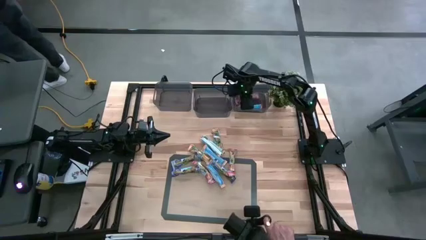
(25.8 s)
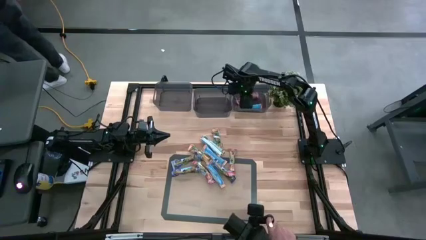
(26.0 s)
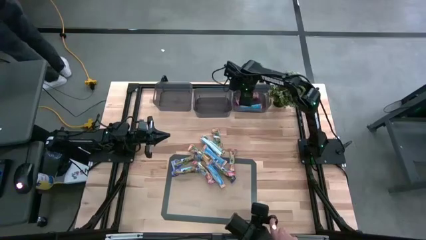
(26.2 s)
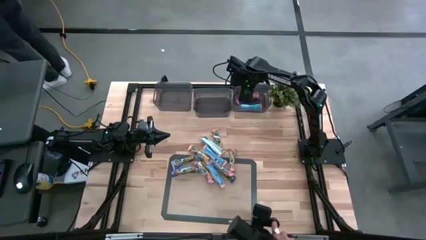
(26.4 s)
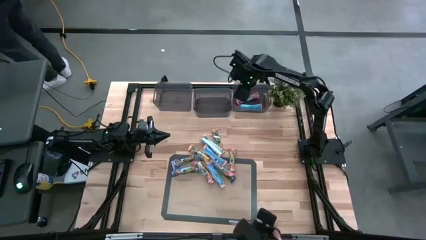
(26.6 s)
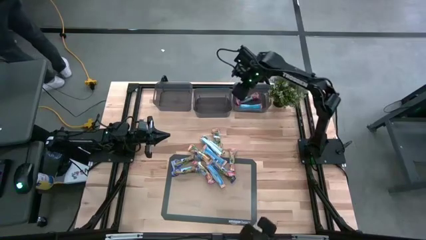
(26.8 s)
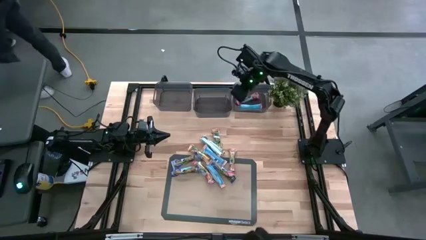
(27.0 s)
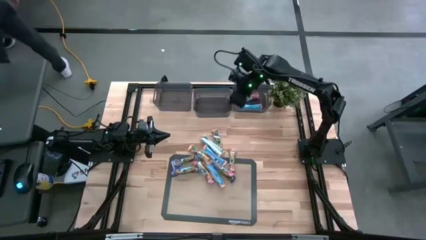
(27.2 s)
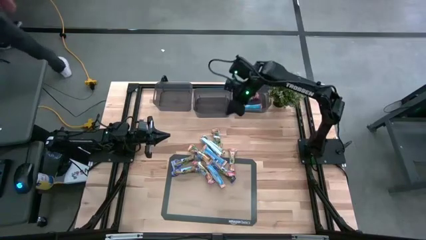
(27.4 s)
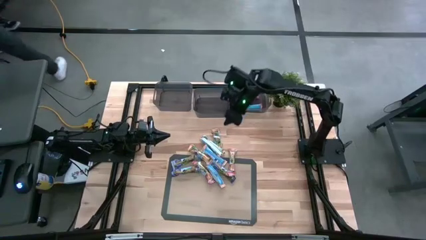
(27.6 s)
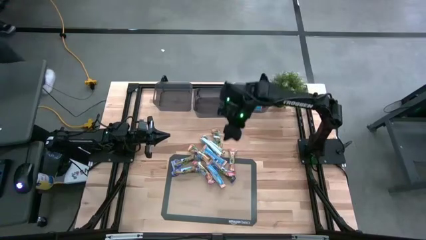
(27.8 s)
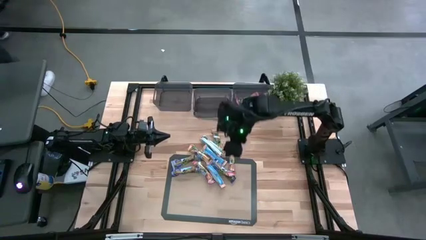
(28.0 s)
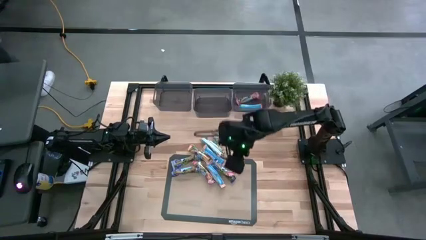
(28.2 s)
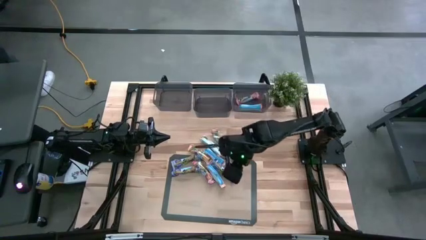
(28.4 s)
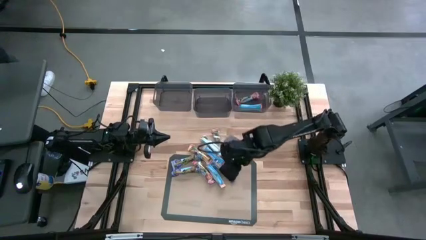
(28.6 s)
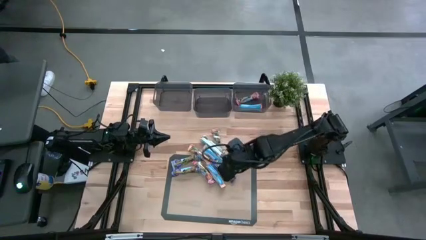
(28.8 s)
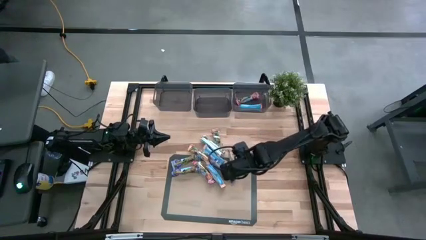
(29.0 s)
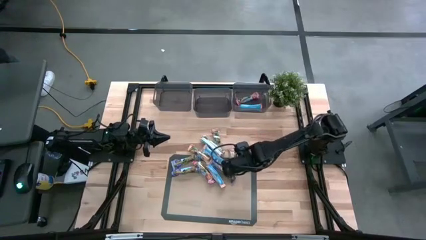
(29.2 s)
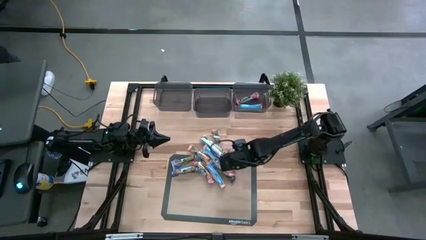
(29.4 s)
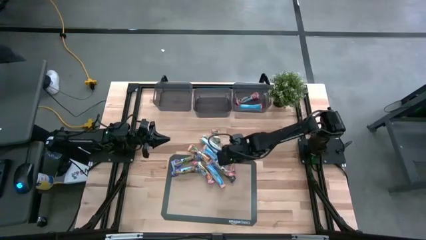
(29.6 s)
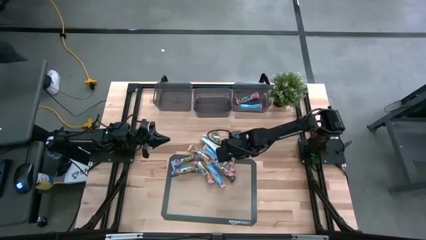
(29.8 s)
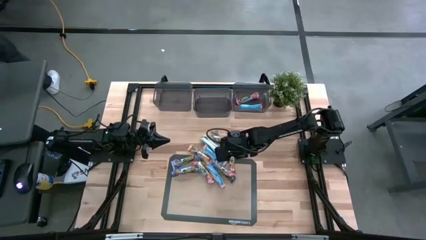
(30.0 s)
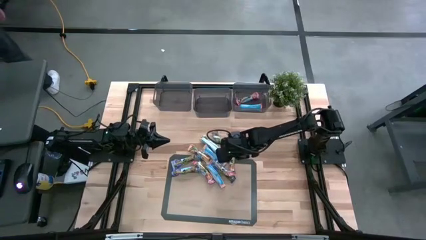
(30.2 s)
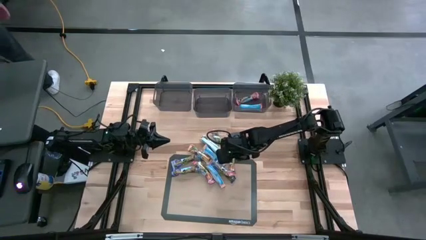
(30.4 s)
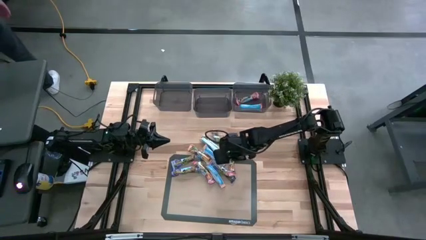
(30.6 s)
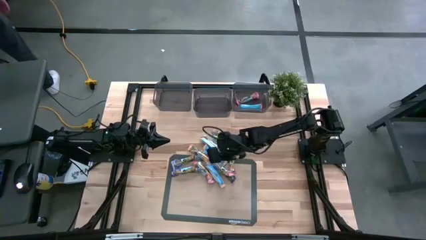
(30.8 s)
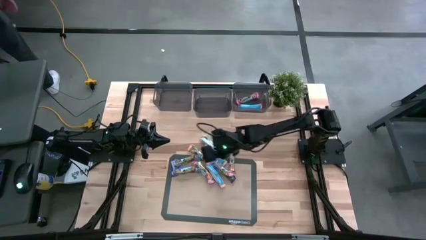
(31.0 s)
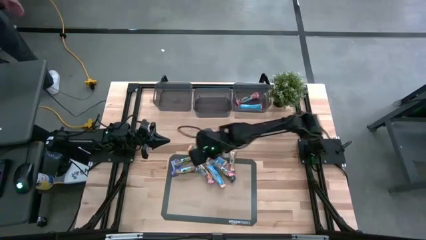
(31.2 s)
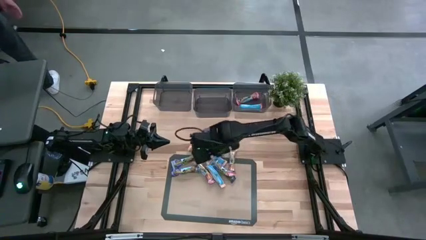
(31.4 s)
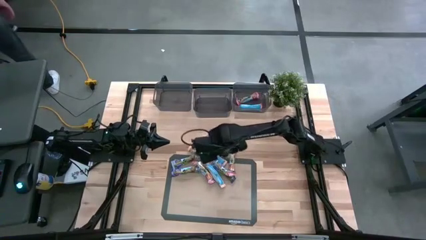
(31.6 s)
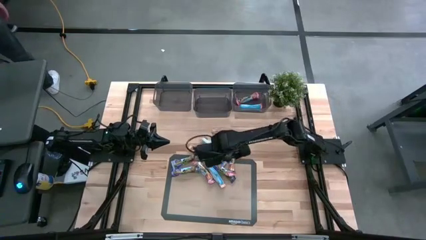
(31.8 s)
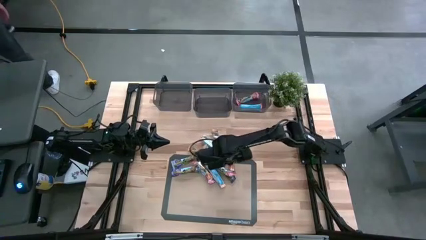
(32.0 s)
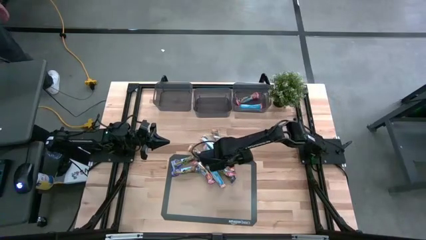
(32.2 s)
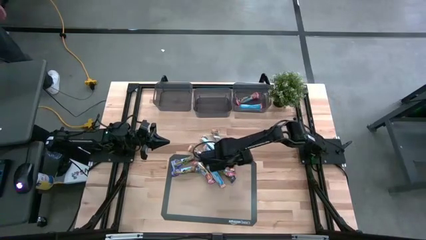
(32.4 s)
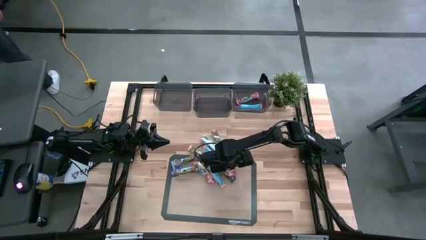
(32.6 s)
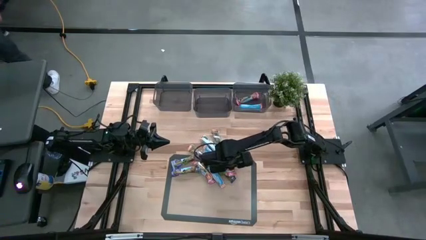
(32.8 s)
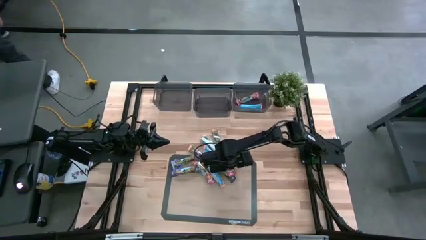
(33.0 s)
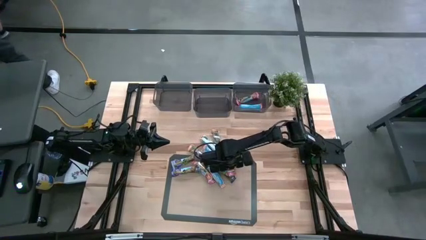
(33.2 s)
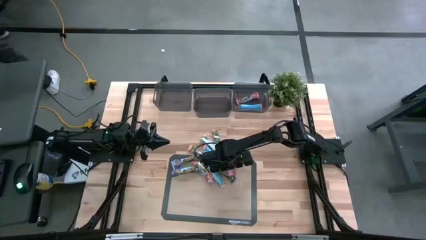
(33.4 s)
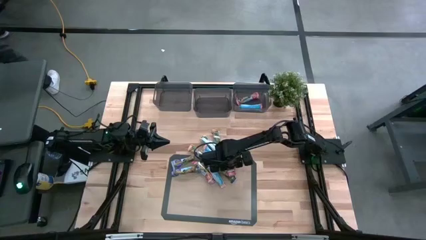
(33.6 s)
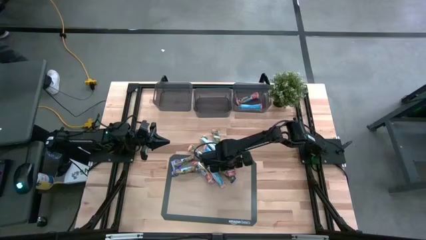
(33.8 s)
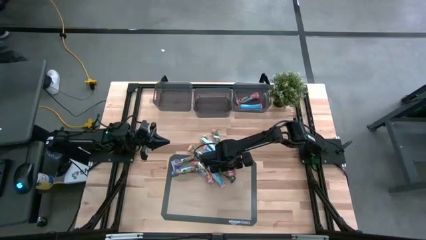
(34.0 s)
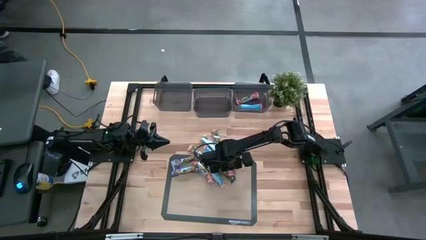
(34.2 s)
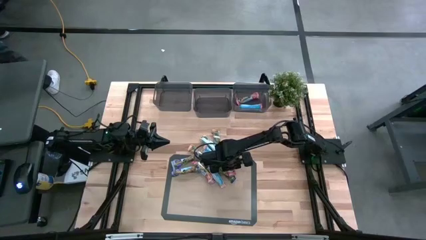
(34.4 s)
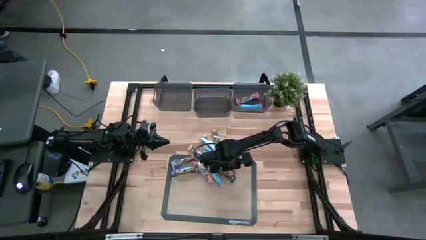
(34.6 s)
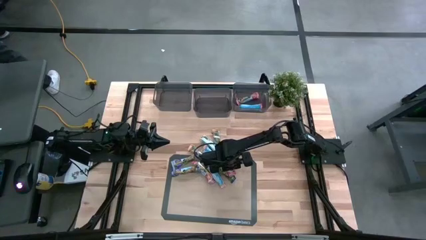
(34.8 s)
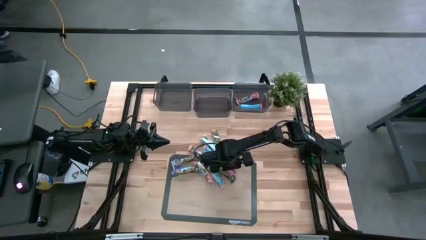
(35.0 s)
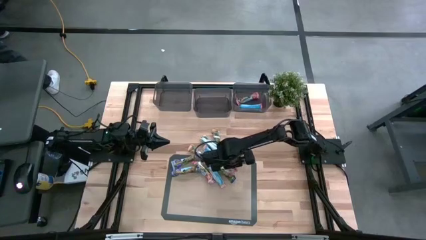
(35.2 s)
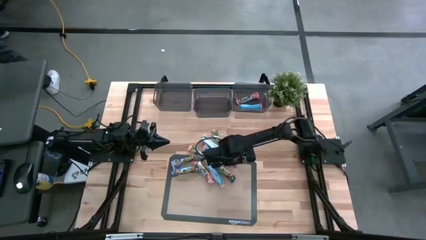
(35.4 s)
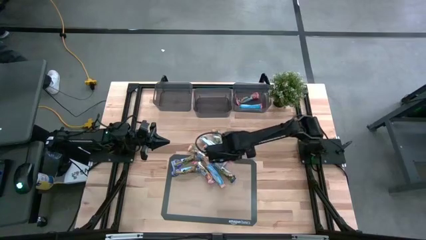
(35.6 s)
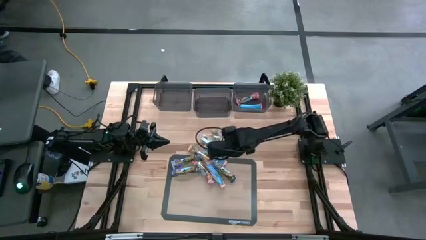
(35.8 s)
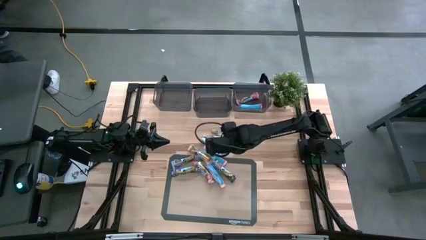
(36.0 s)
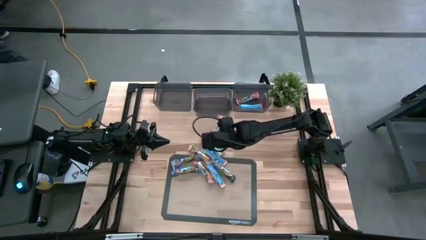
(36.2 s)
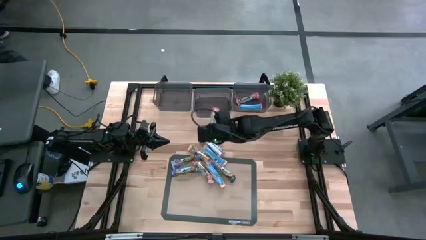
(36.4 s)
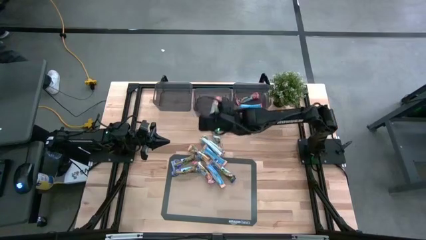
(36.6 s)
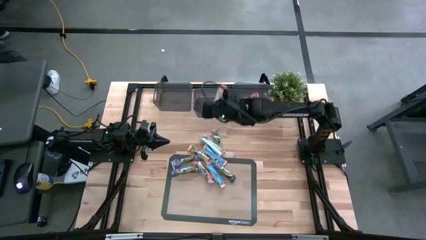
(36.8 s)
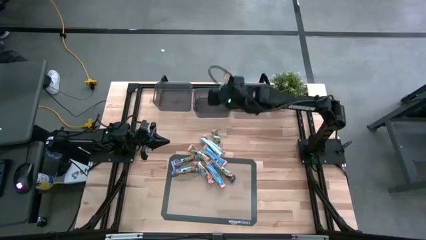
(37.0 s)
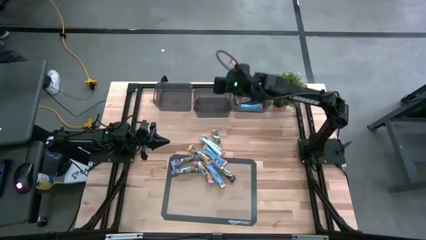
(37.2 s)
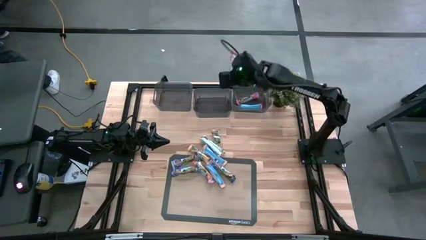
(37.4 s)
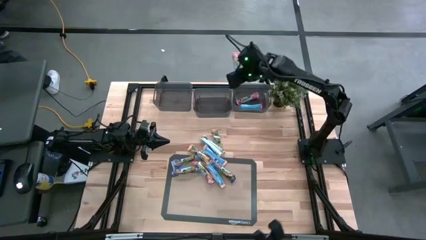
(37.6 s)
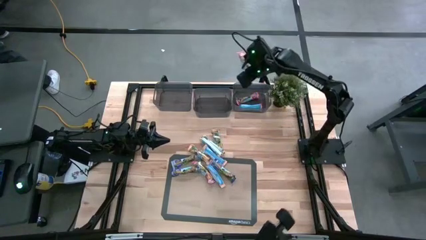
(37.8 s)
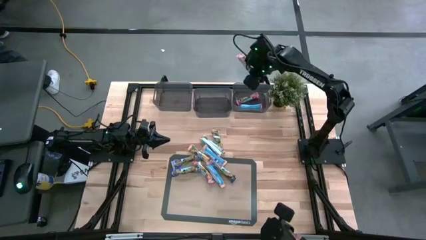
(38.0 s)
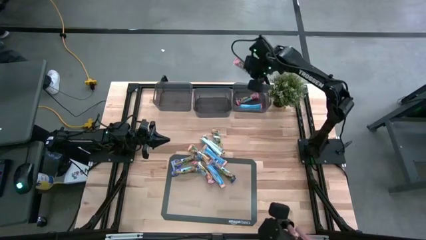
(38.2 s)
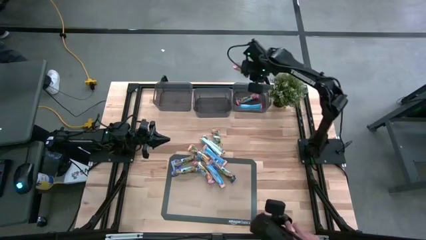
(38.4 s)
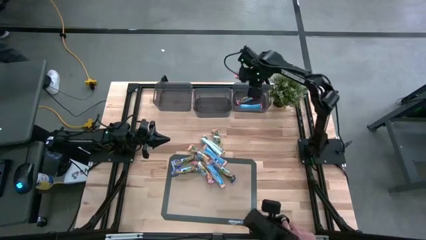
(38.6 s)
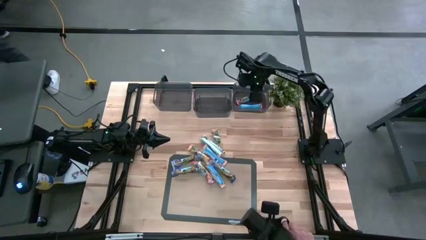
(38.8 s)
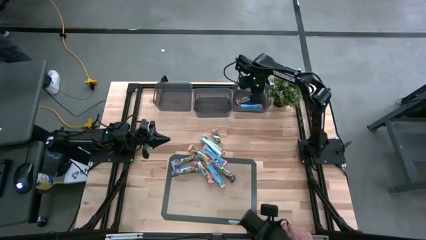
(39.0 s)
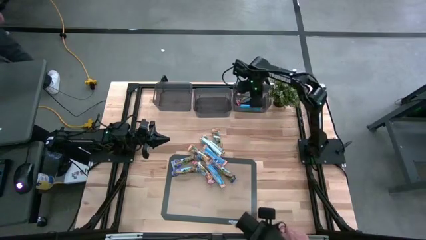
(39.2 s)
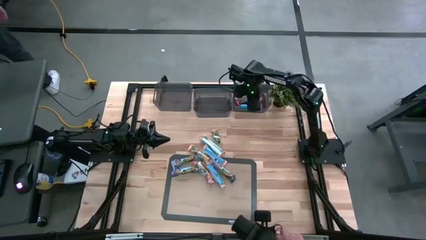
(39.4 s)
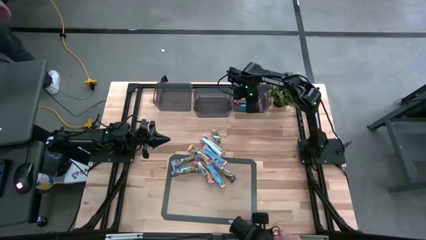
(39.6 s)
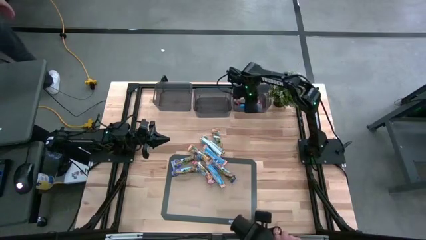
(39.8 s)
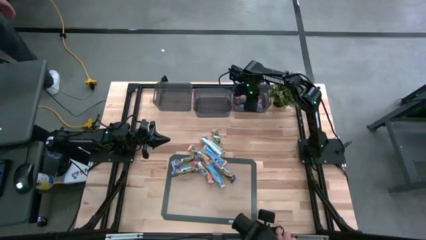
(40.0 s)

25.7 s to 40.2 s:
Task: Pick and place Granola Bars by type
Put the red granola bar into the right black bin
